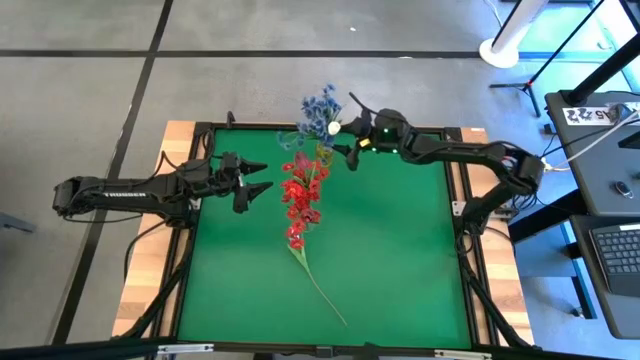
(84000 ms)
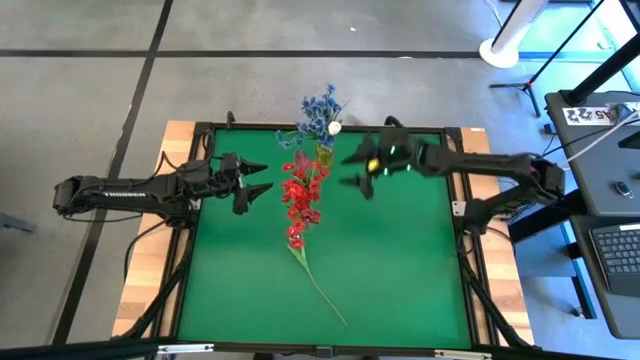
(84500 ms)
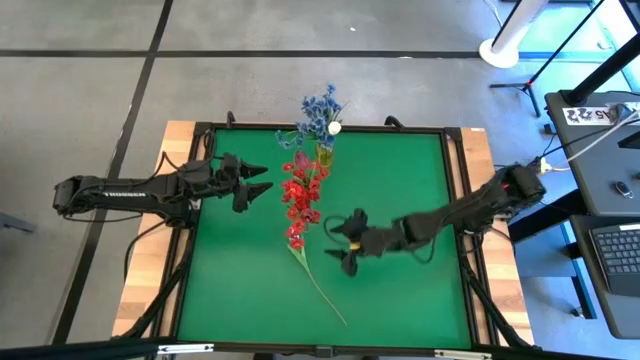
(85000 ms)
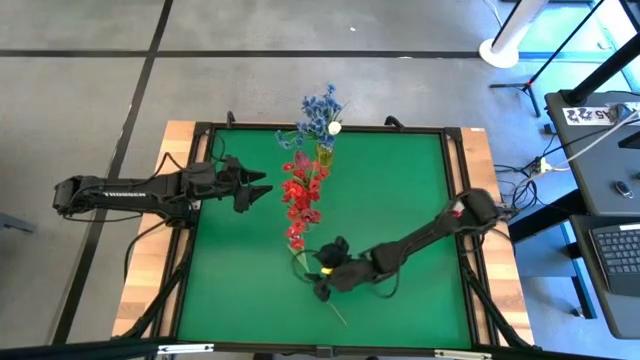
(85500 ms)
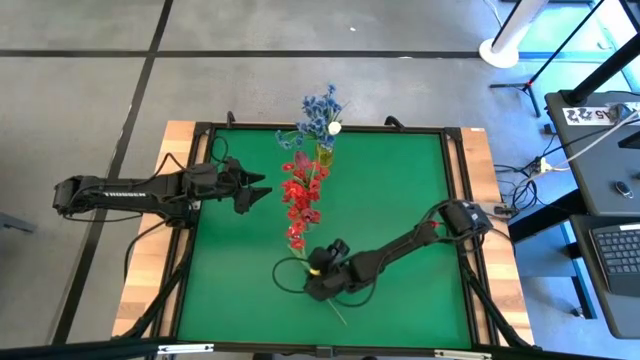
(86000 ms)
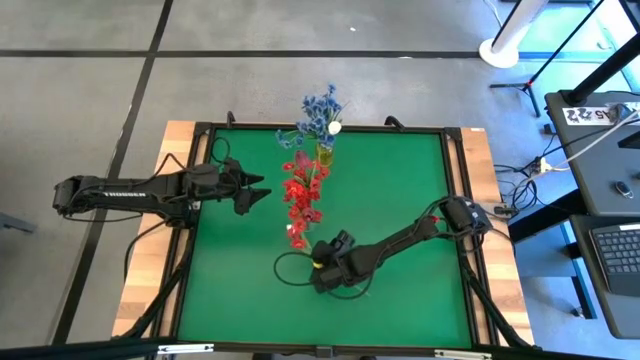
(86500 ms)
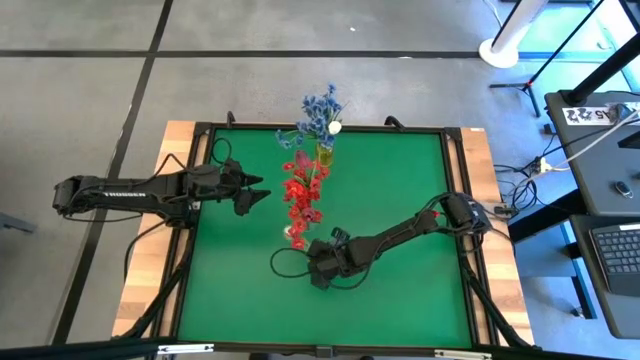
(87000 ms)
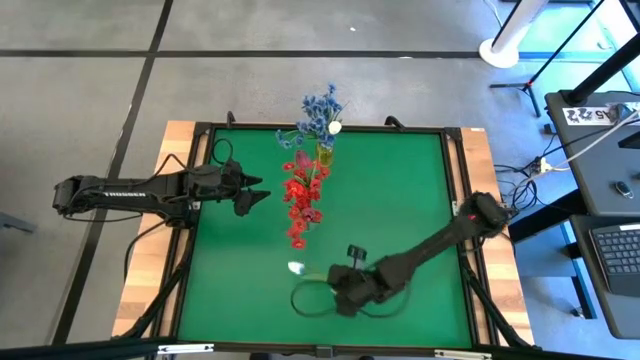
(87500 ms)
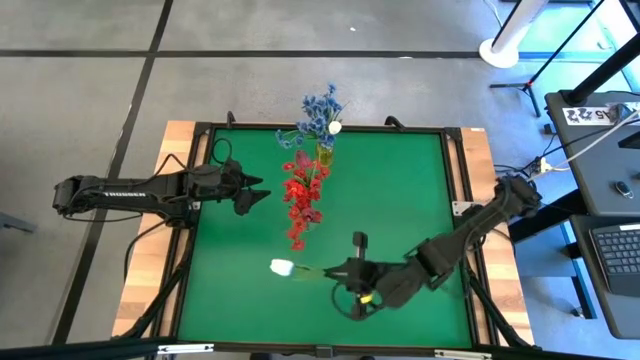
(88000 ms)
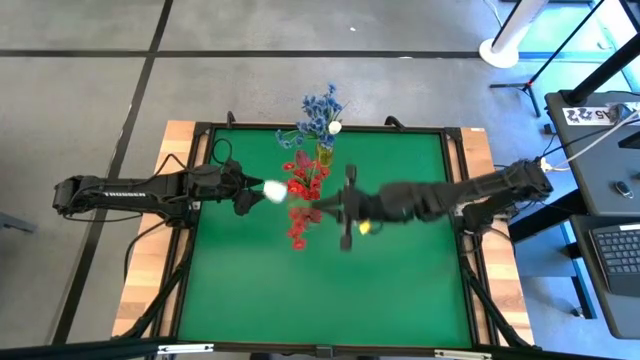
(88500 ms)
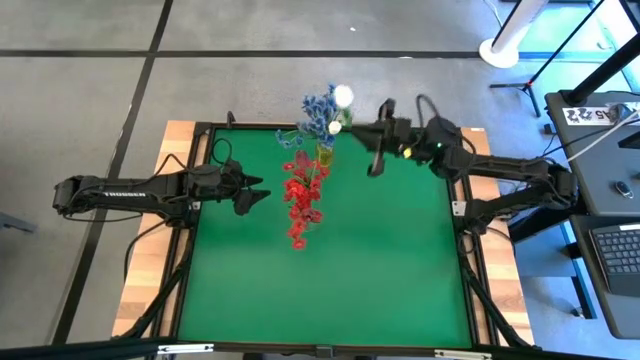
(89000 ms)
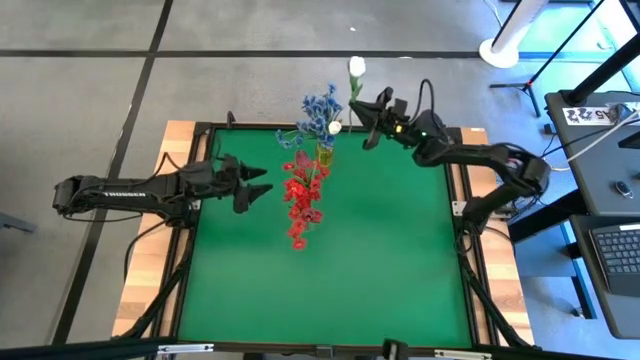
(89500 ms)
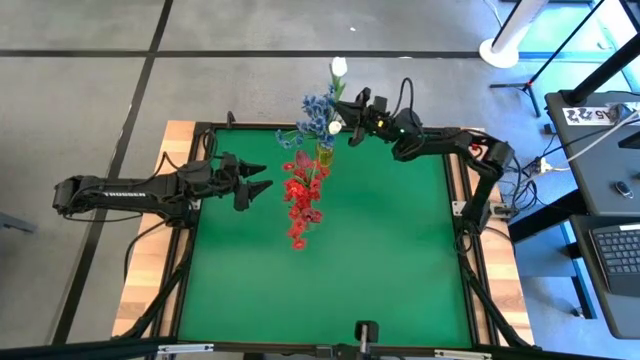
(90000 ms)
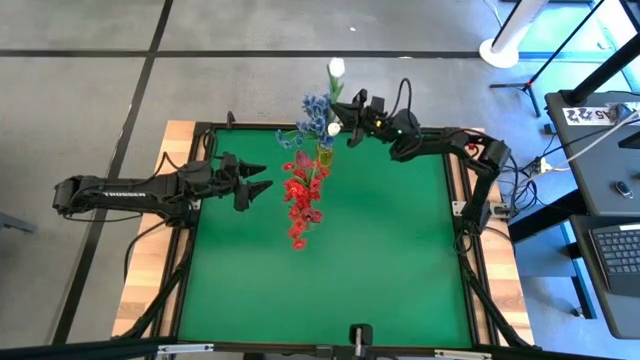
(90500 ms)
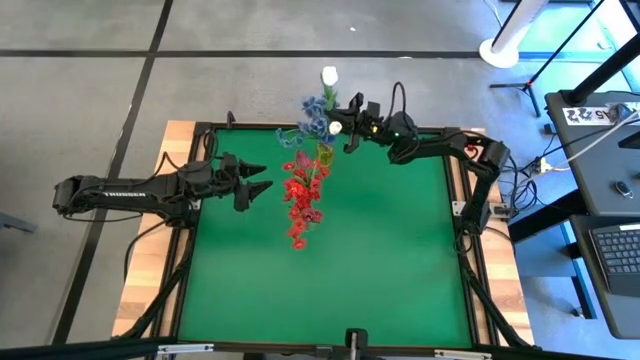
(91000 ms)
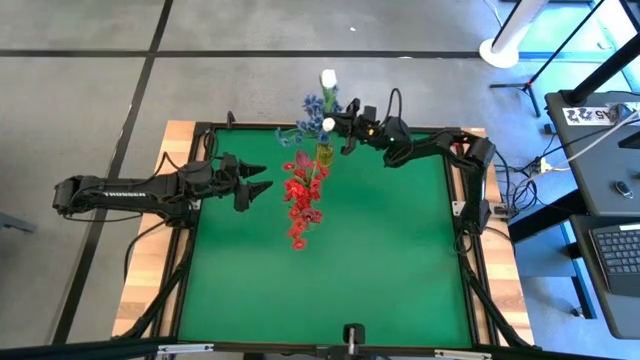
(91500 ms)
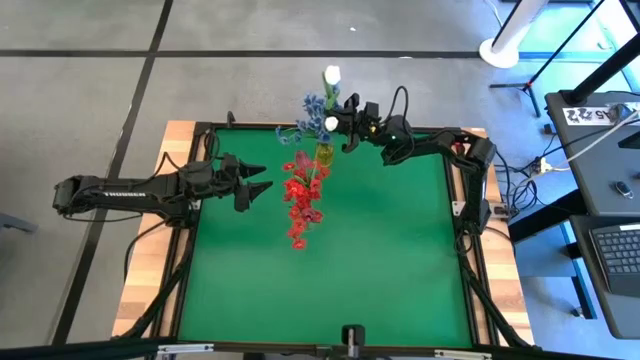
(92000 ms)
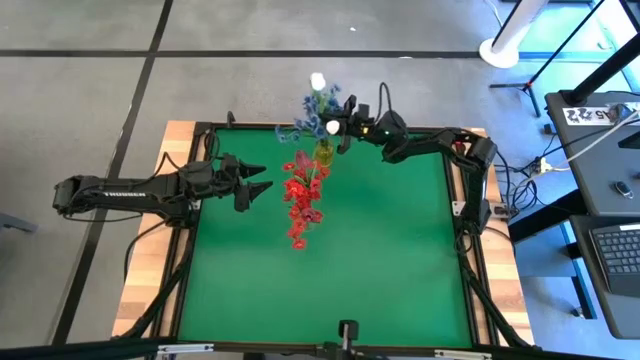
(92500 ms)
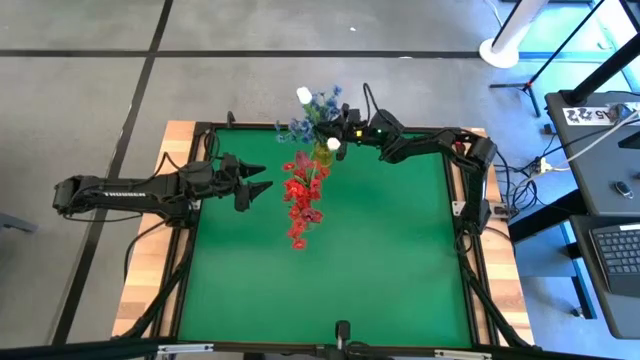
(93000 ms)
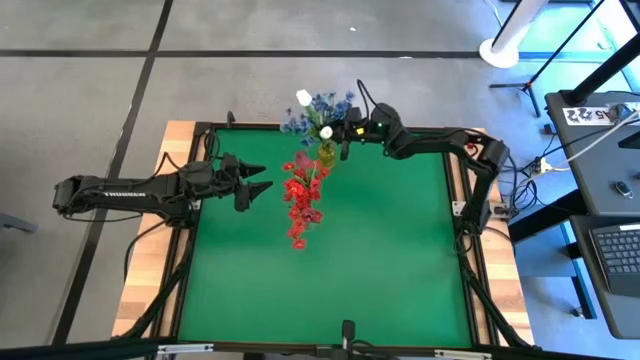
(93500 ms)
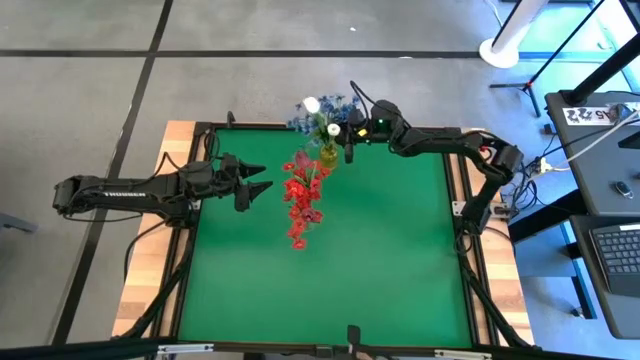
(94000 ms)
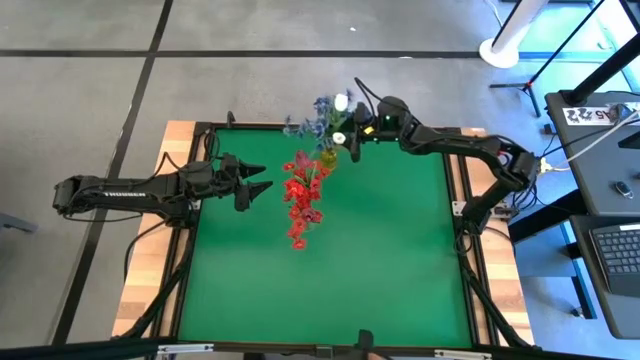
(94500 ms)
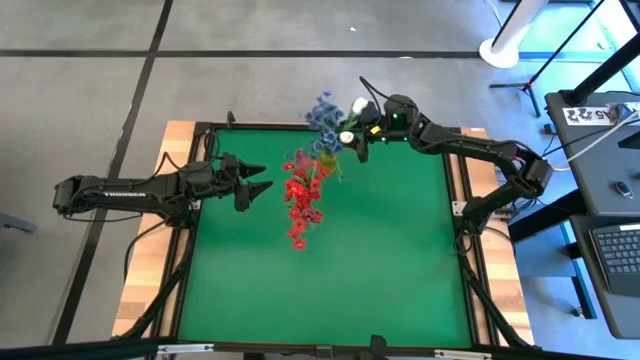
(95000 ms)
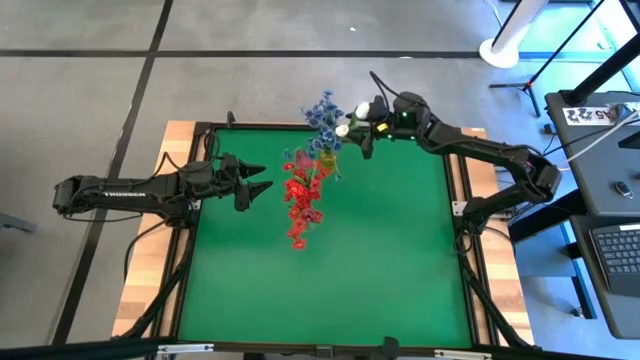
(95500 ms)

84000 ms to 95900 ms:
Task: Sort flowers into vase by color
Put the white blue flower into the yellow vase

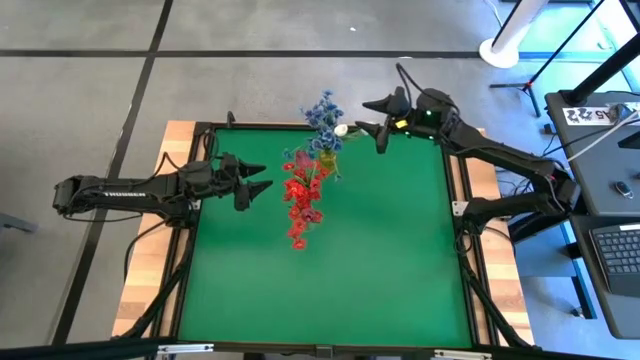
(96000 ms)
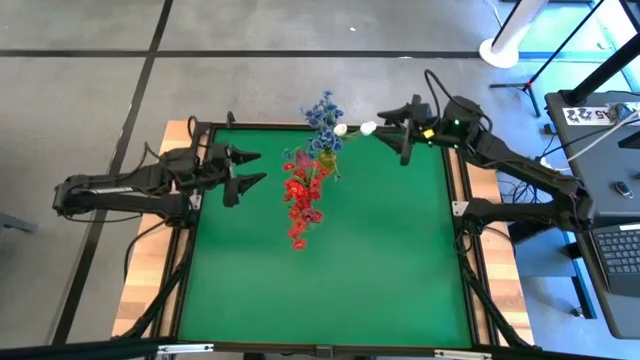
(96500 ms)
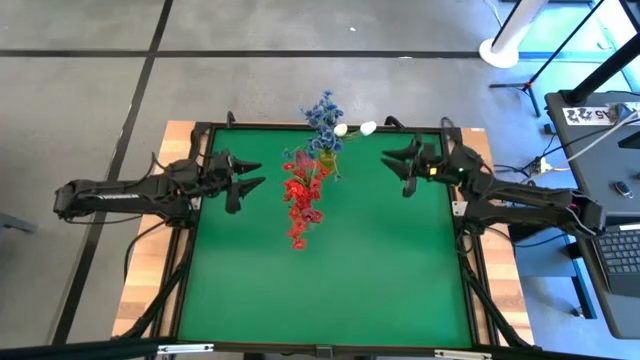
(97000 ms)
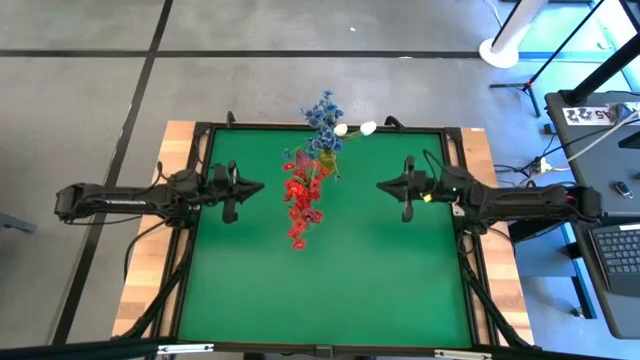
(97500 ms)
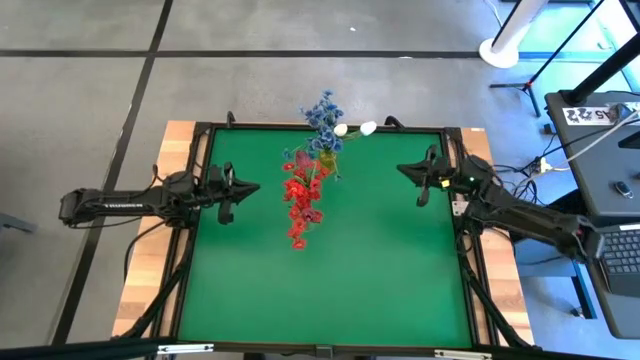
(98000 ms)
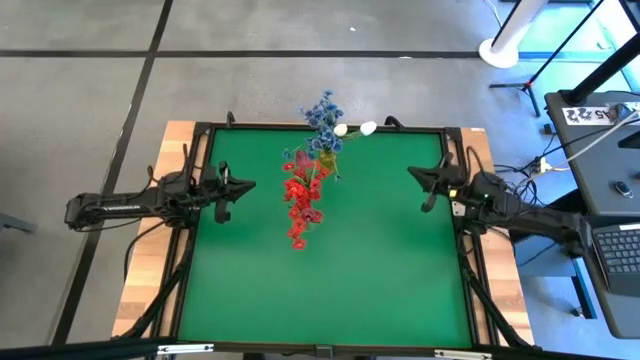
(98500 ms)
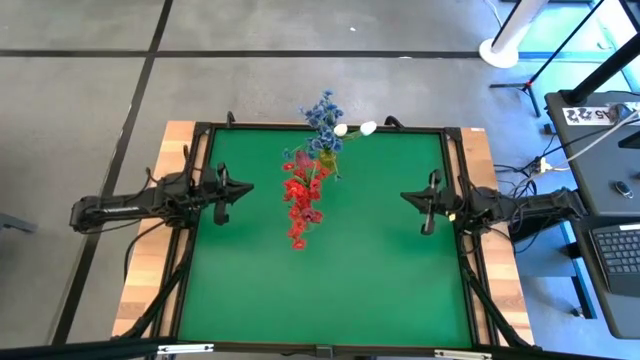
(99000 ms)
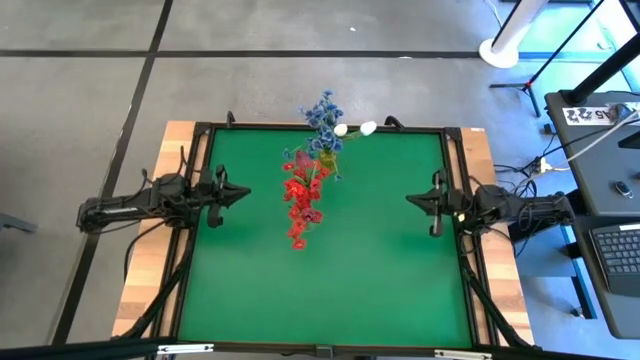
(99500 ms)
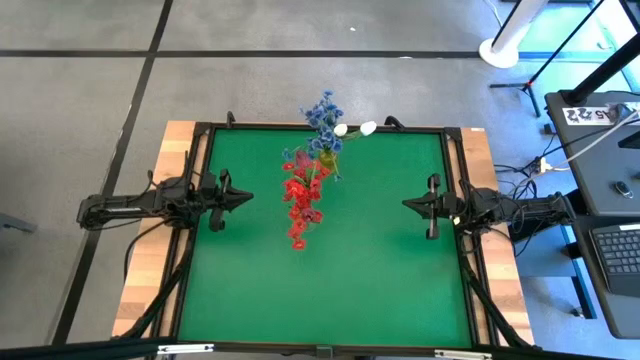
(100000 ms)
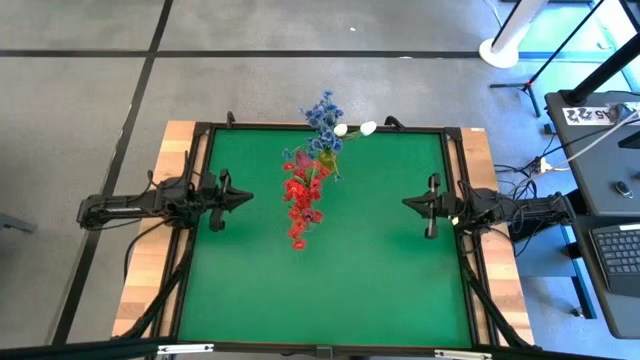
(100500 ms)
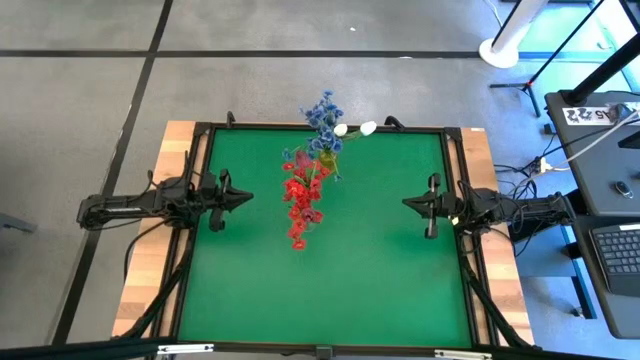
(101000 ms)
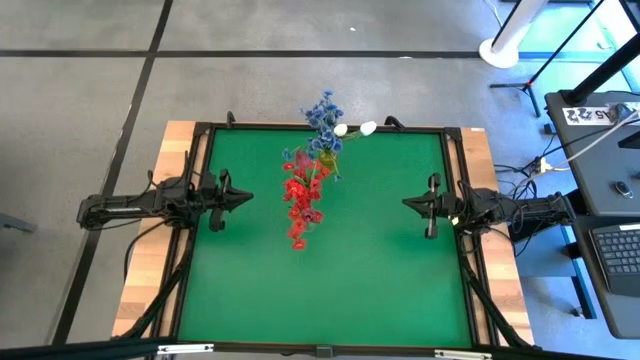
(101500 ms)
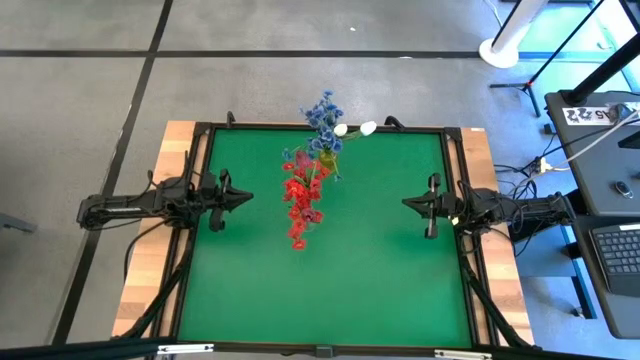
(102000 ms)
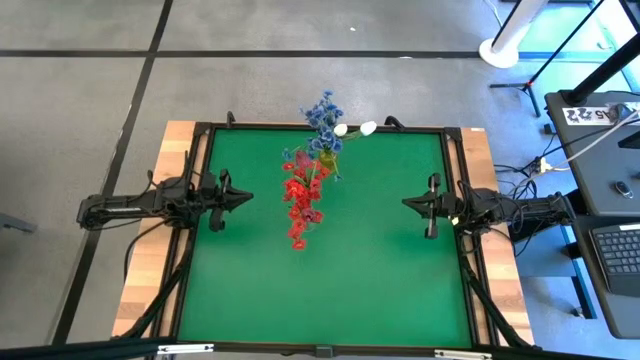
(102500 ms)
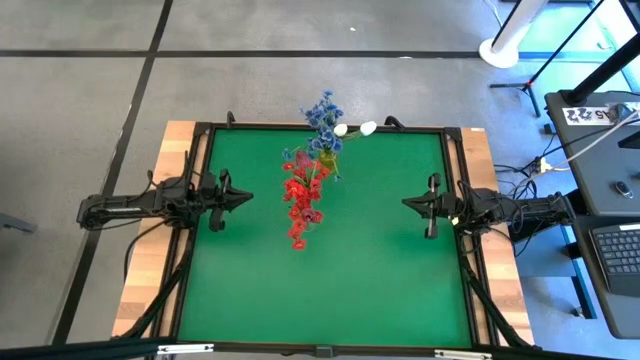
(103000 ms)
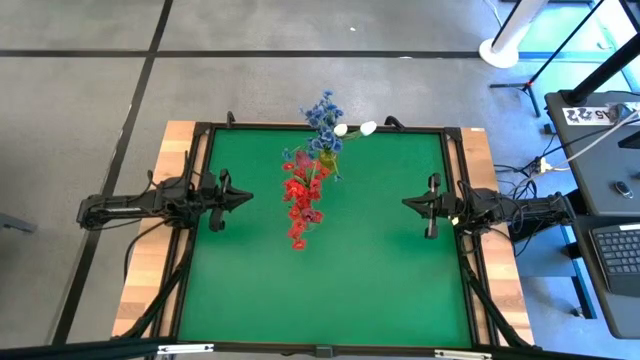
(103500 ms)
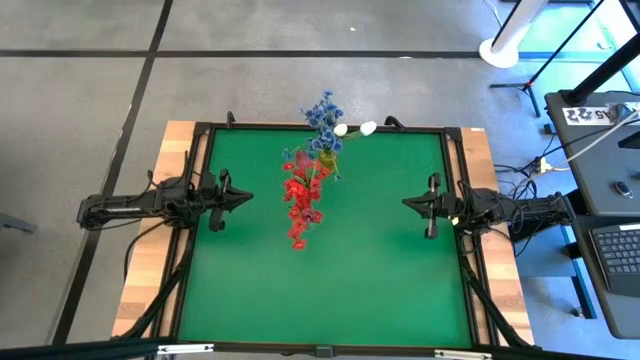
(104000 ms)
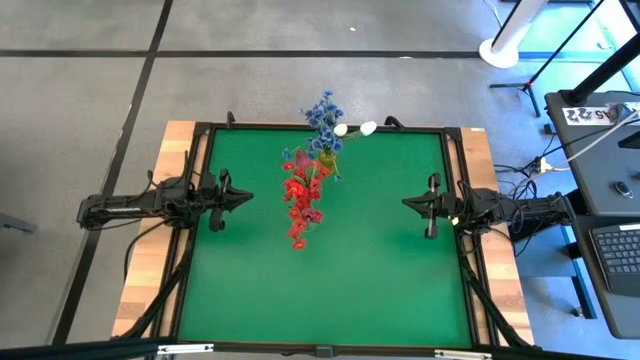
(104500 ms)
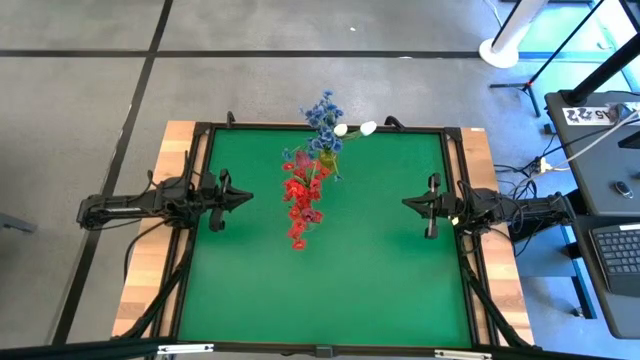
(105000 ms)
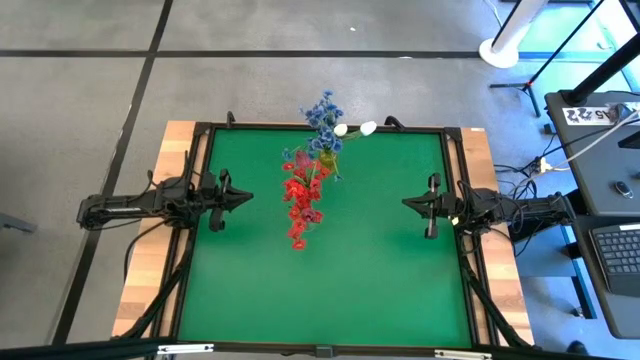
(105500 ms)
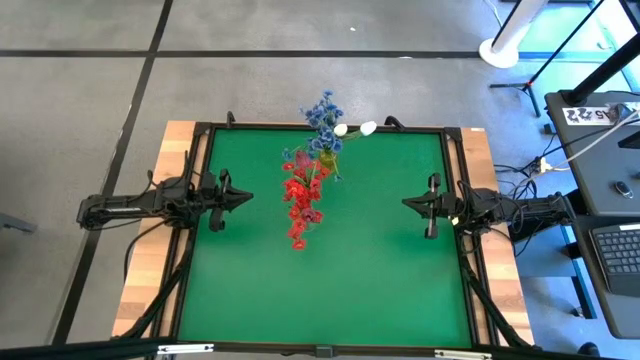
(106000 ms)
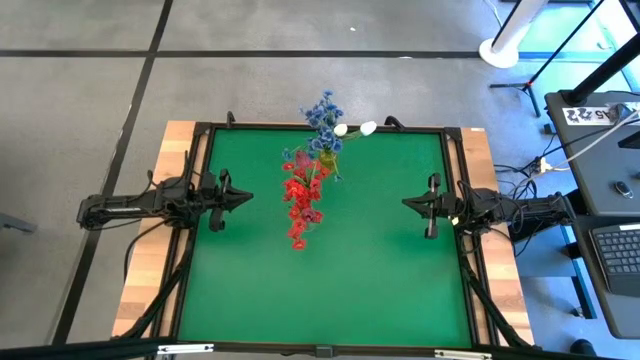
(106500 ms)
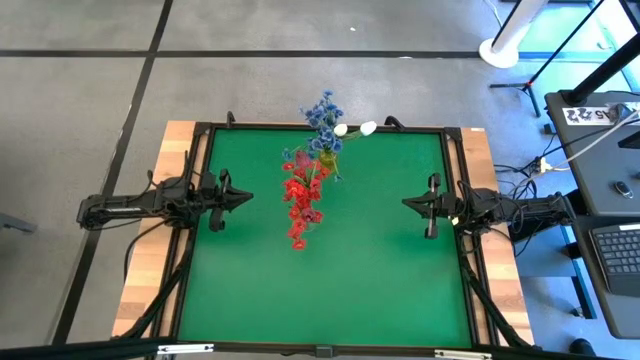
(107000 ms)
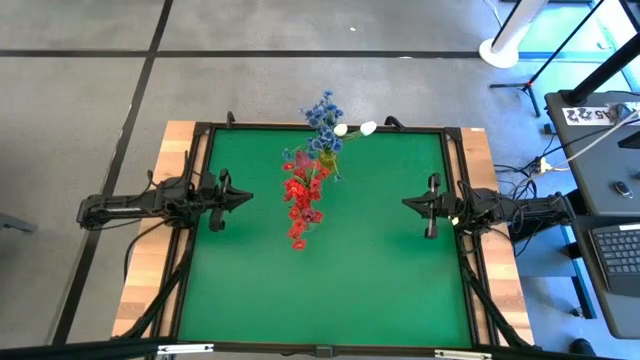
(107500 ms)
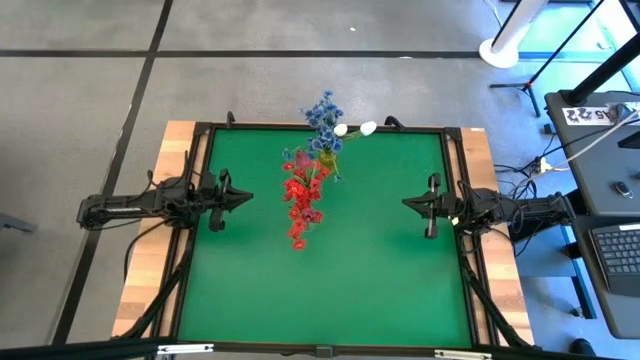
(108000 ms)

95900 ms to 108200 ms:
Return to Home Position
